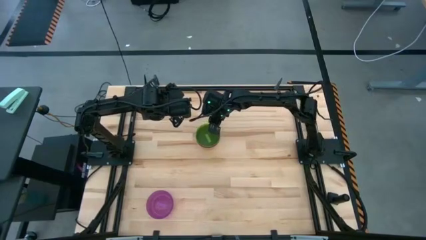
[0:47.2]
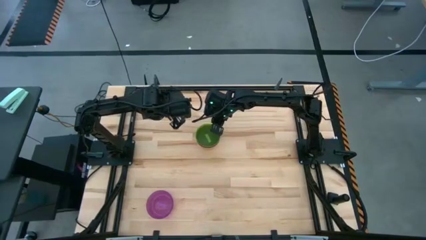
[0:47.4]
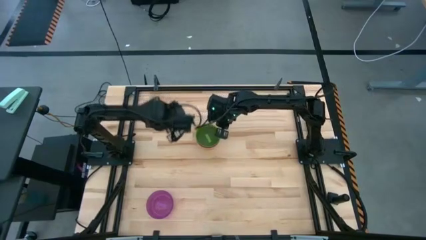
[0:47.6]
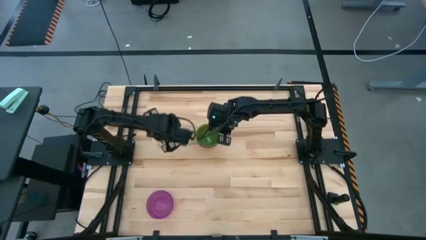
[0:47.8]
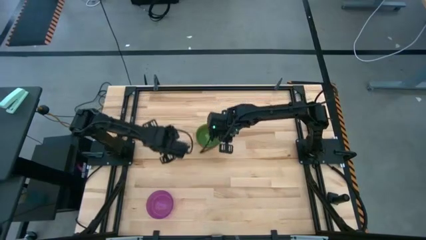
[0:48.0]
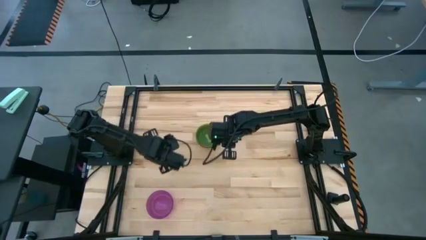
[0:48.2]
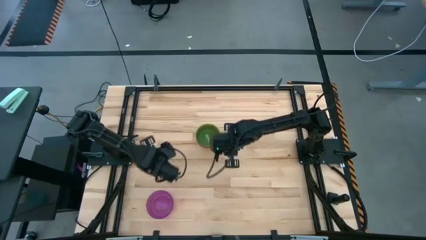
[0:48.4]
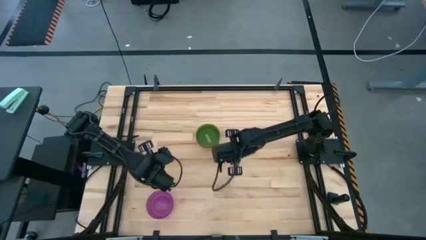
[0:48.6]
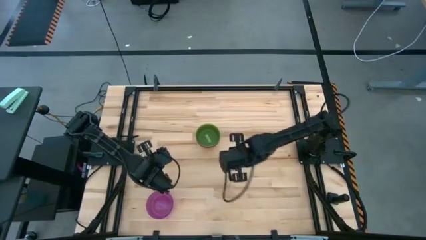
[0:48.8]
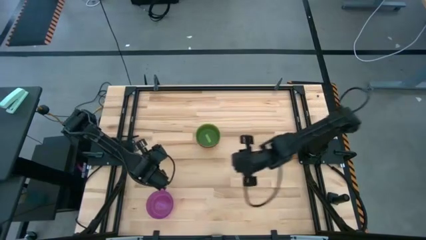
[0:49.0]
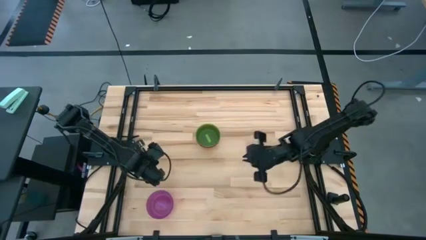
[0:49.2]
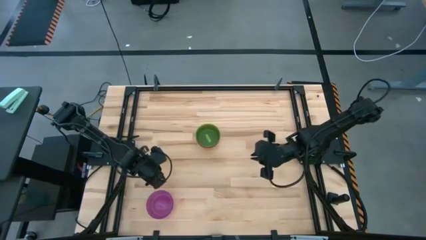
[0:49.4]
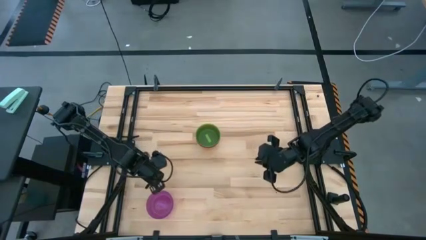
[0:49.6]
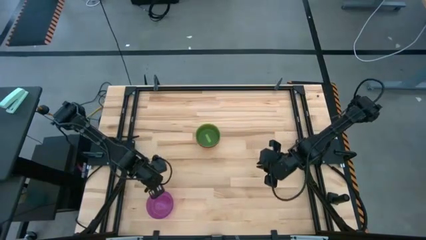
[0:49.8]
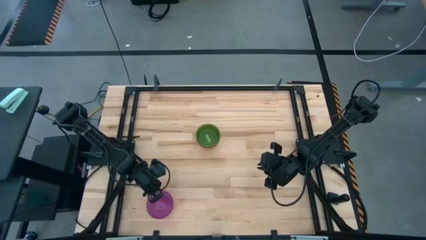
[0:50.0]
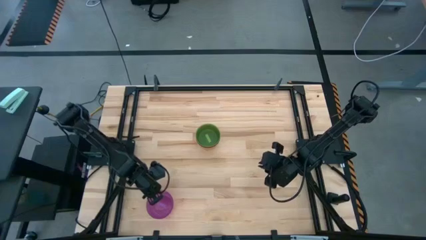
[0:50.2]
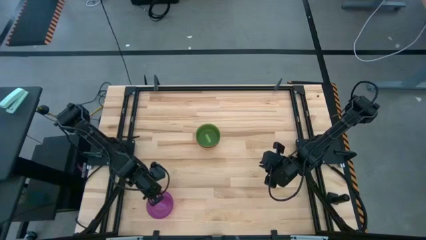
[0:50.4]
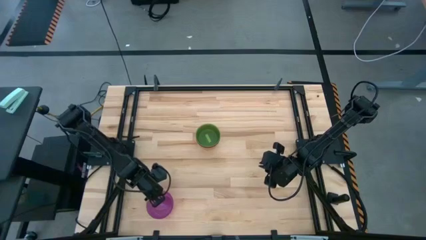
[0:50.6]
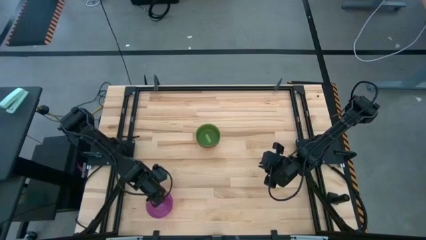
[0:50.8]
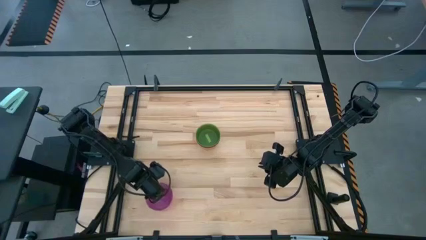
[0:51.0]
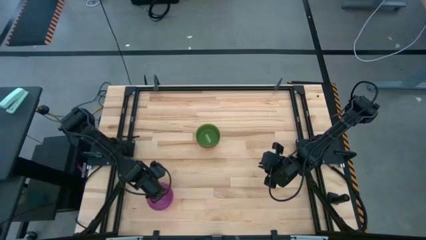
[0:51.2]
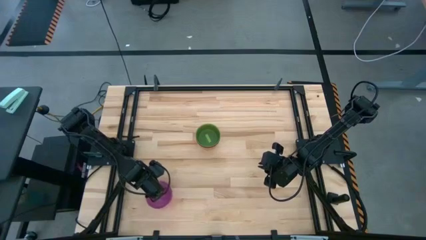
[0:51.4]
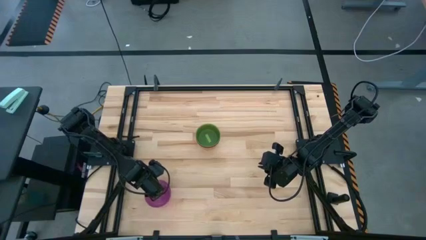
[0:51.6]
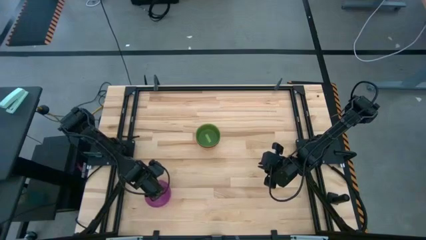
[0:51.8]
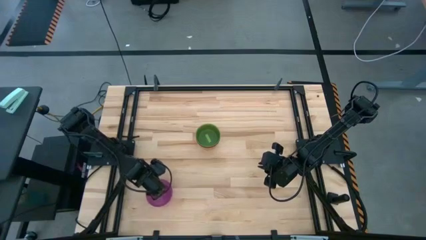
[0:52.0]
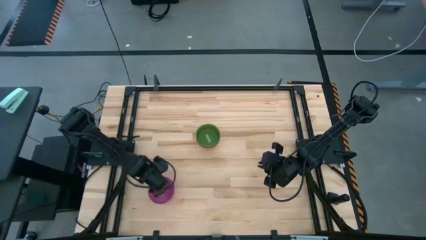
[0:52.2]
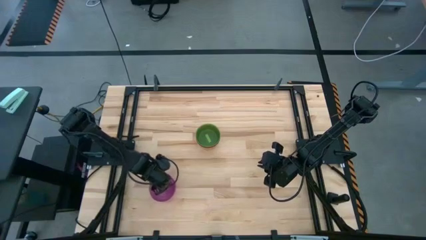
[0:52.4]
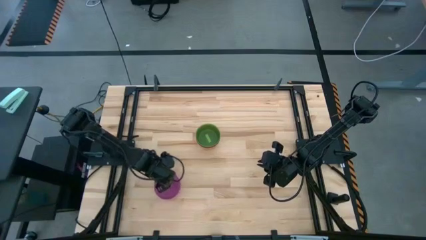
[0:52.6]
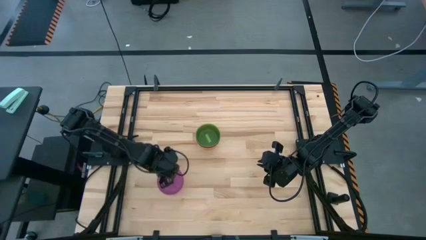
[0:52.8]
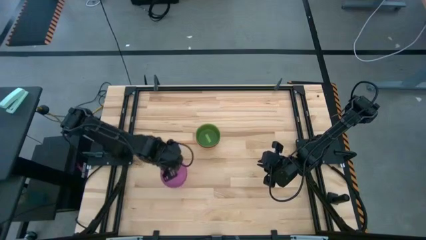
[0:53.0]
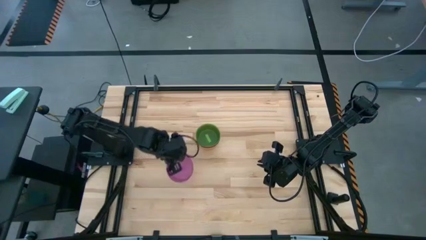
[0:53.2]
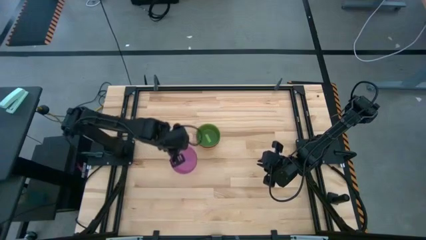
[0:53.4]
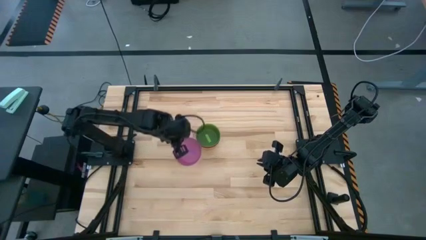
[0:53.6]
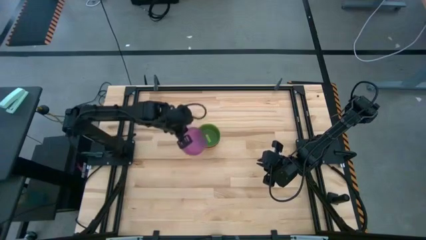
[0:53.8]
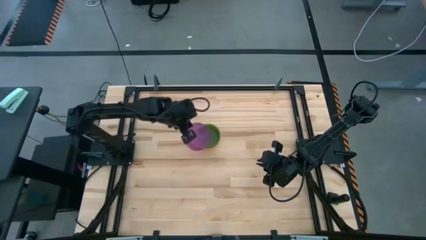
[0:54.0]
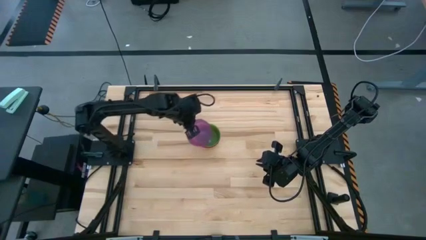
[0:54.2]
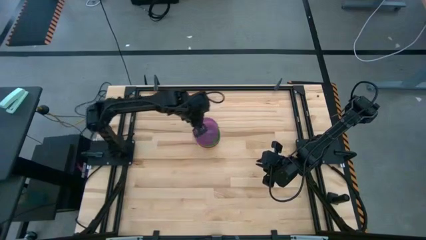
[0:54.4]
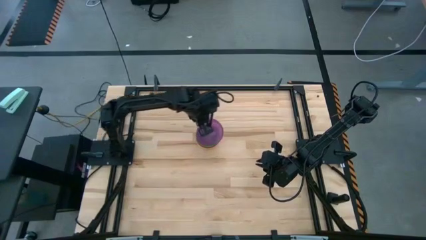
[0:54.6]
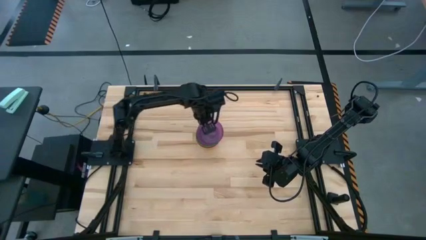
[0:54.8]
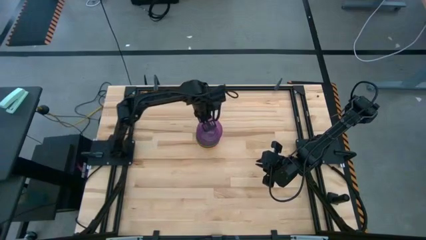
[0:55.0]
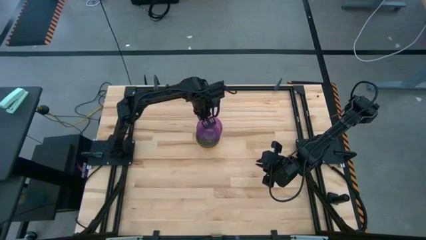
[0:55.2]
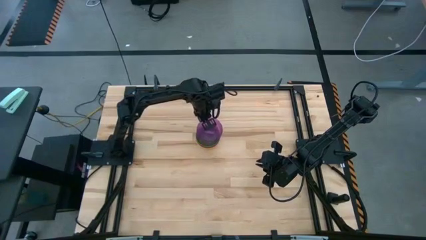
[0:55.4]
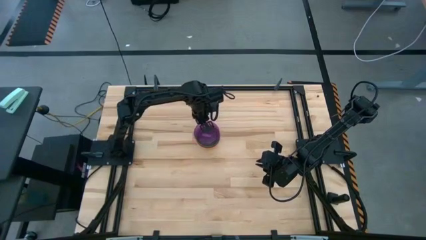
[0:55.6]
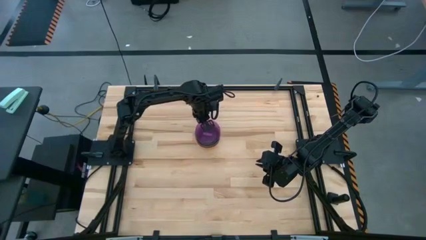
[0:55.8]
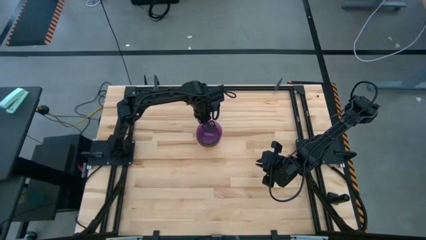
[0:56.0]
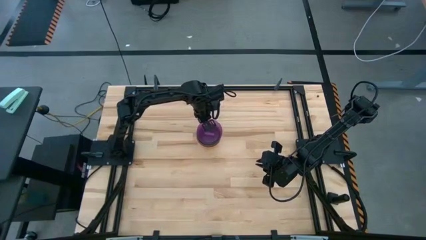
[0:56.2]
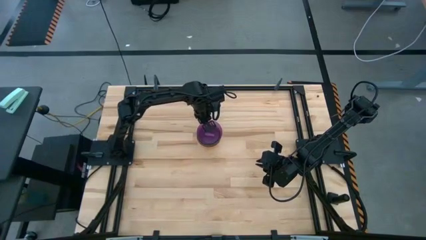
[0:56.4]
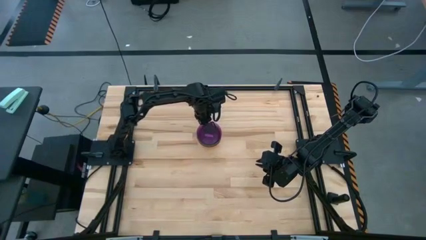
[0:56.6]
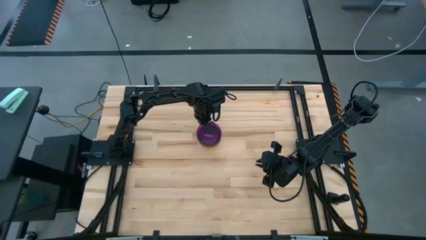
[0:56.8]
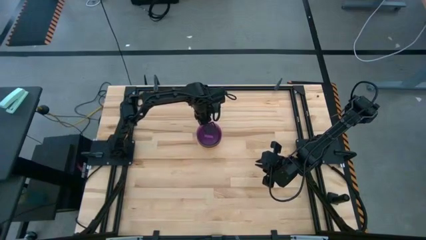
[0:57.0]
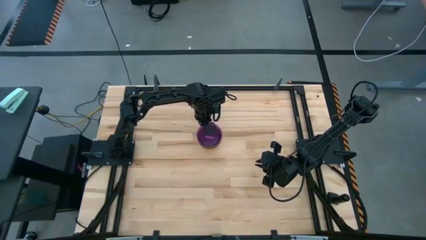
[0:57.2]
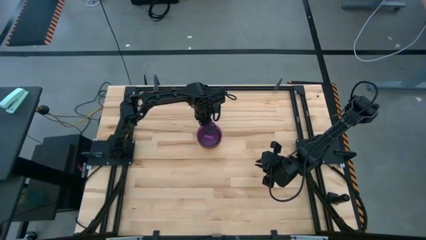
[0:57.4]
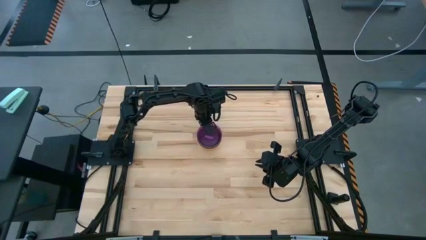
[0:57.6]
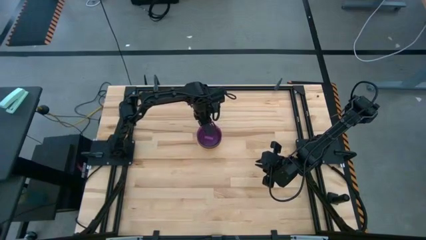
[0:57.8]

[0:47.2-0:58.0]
Task: Nest bowls inside each other
Stack the violet bowl on top of the green bowl
